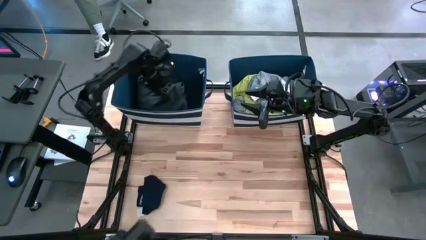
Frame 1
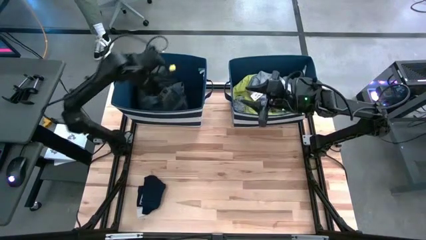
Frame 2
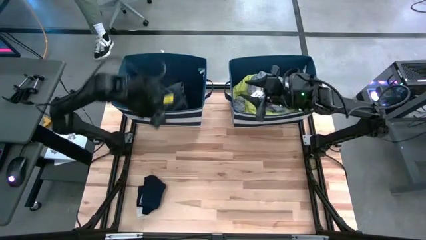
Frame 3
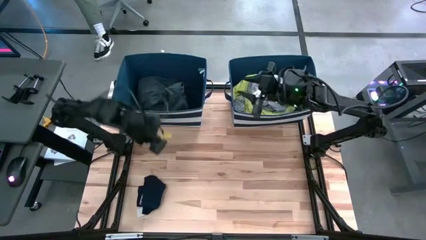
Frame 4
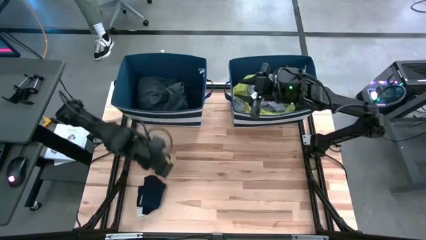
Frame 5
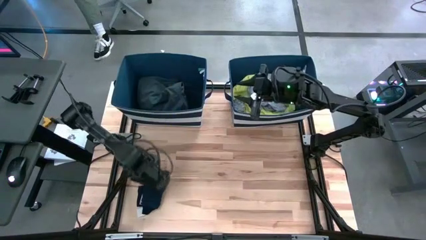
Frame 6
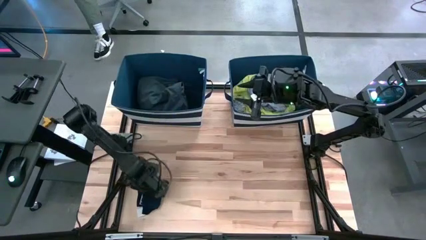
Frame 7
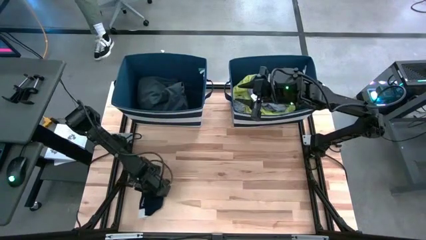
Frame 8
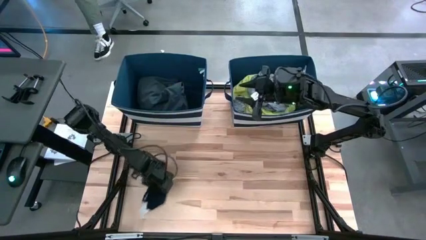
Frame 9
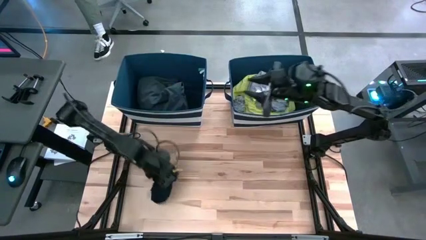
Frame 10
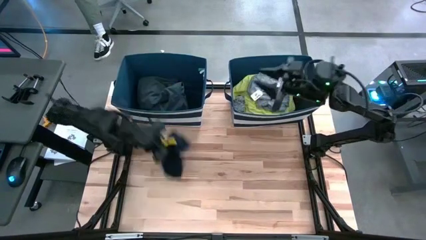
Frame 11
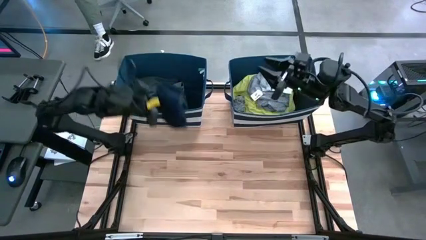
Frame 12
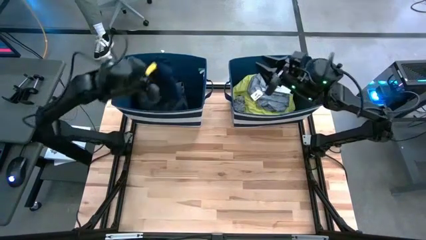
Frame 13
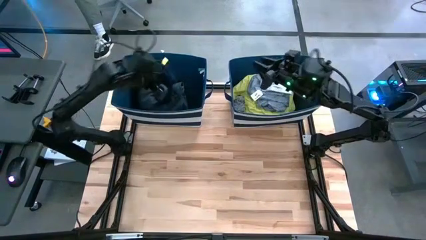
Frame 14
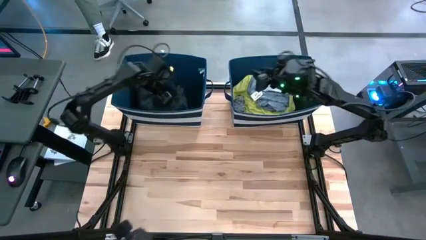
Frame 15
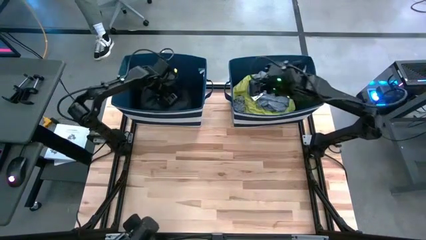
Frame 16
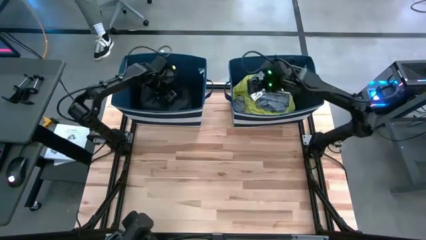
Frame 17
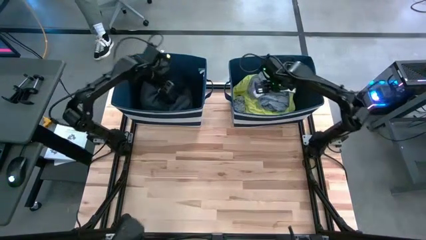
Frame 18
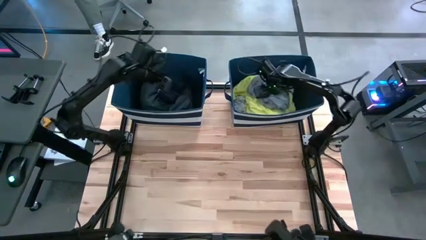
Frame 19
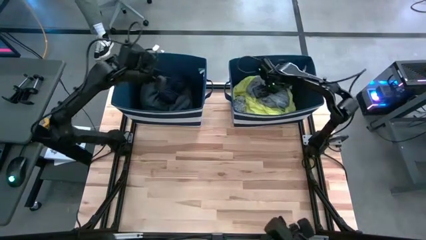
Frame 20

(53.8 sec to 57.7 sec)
Task: Sort clothes
Put the dark blue shirt into the left blue laundry bin

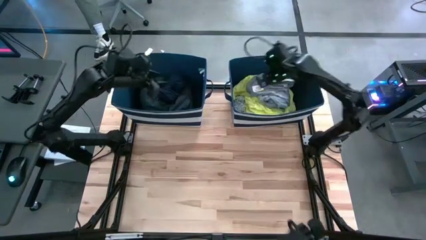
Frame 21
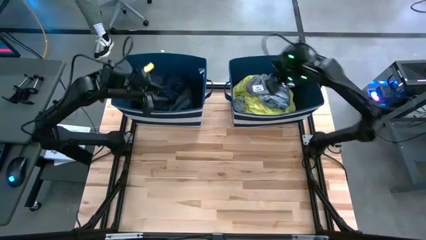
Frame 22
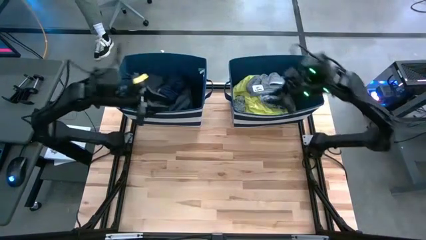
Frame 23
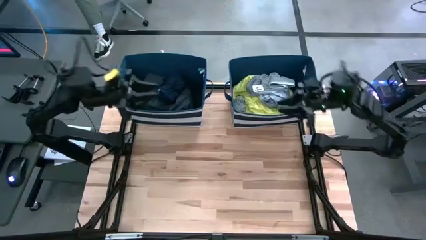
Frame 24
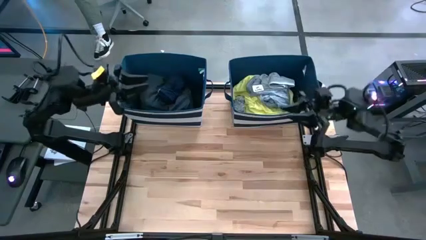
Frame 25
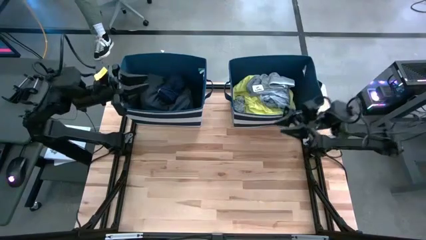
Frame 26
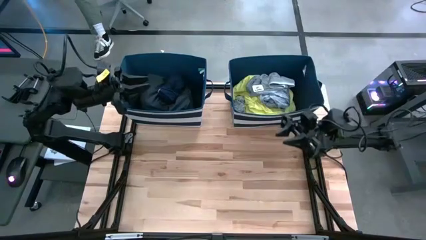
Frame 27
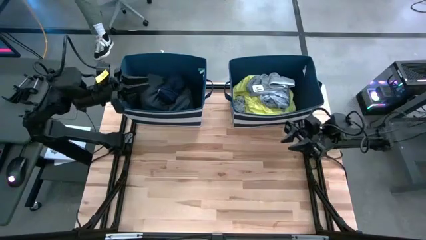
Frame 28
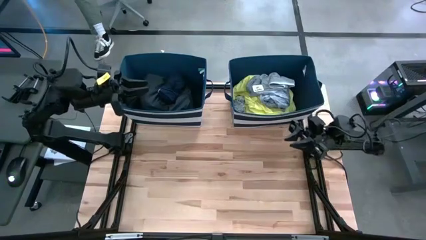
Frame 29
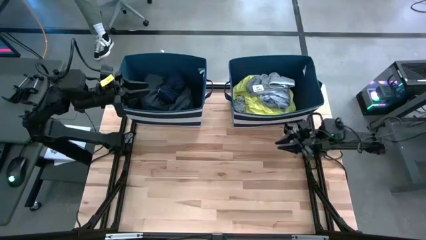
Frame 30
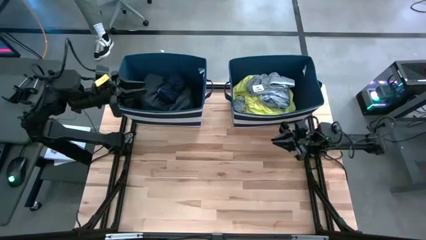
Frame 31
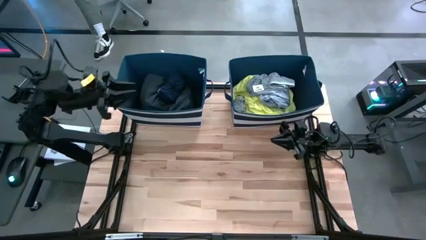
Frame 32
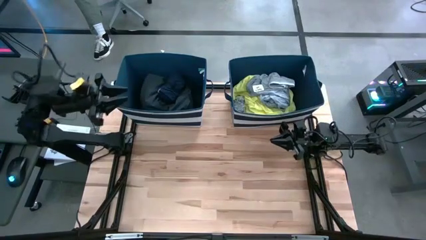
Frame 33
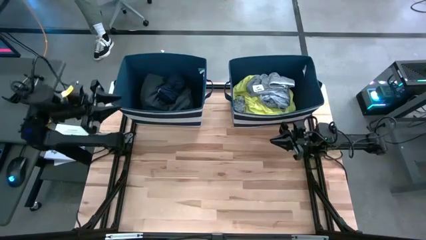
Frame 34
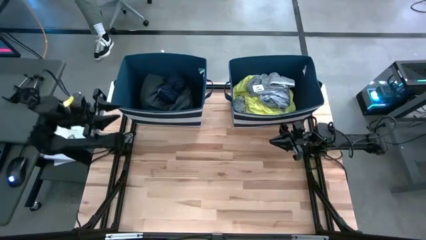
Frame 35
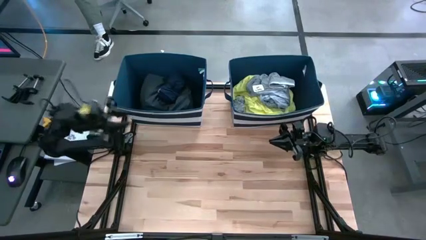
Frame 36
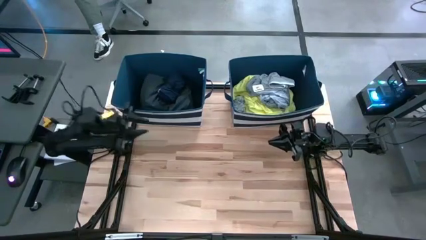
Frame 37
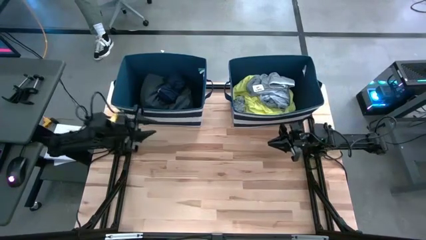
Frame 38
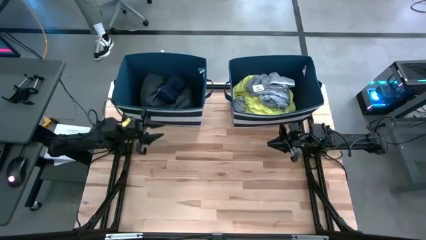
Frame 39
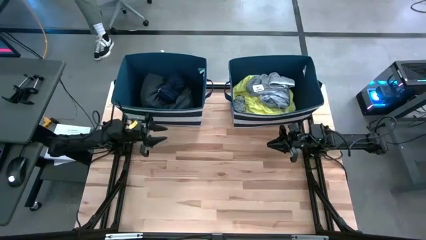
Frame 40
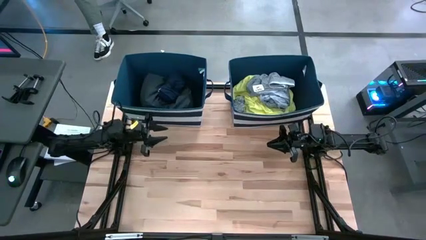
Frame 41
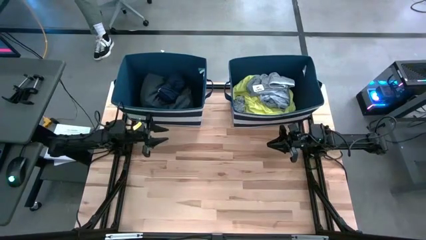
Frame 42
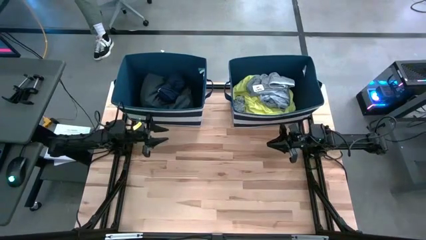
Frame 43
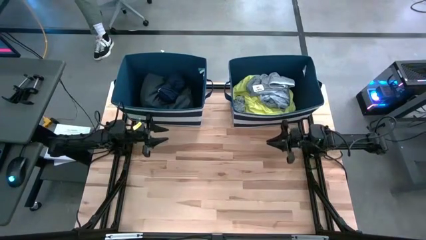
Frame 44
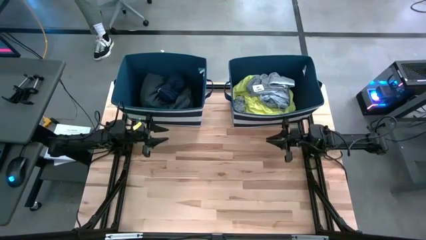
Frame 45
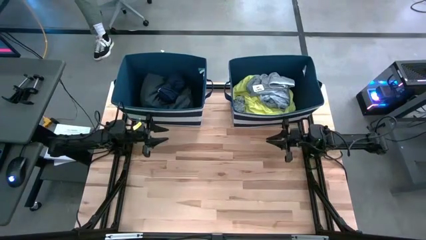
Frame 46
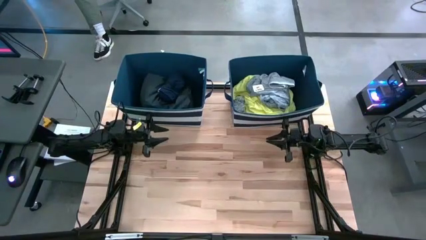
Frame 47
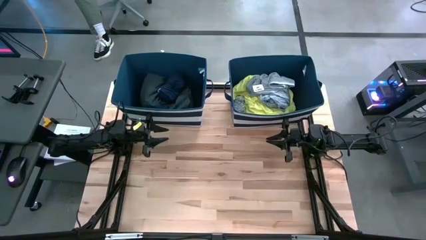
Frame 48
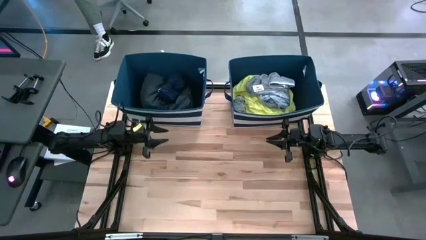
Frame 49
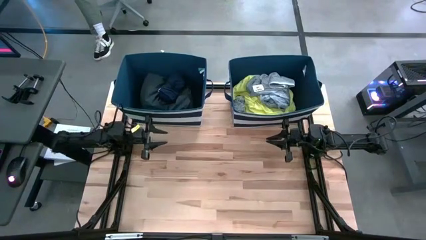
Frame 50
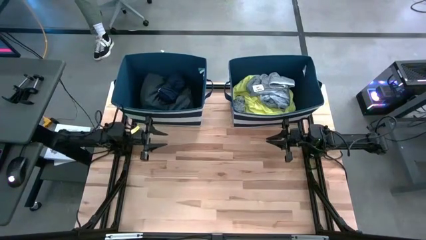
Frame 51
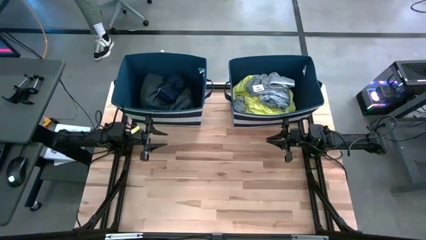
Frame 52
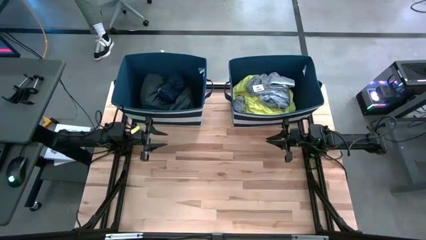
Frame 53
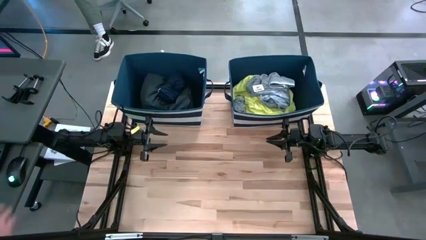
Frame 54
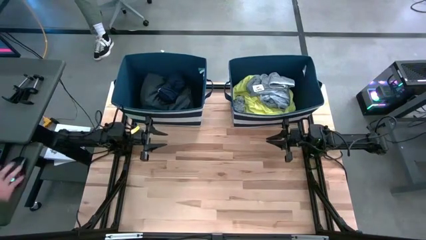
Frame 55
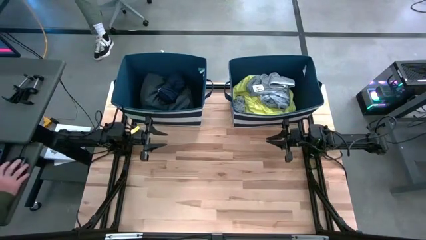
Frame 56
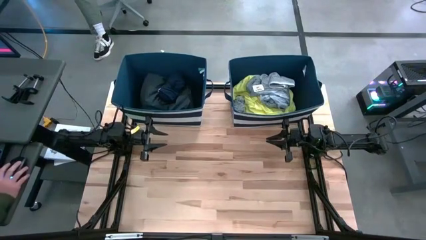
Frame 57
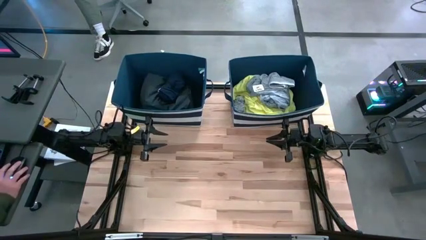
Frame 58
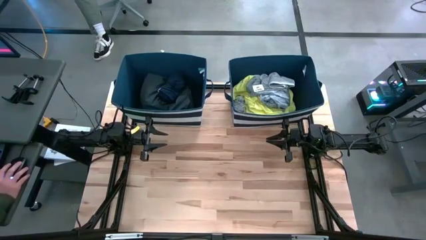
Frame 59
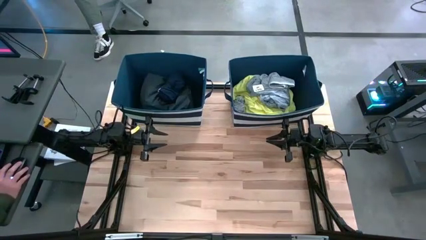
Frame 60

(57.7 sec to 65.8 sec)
Return to Home Position

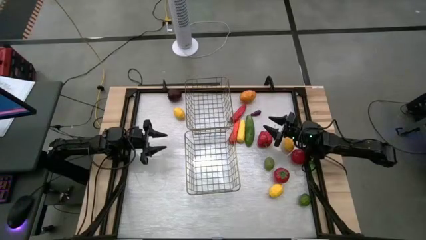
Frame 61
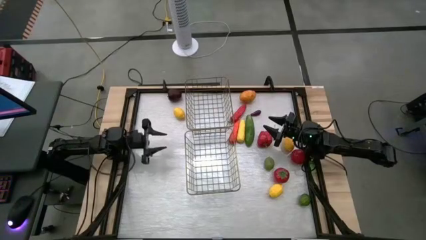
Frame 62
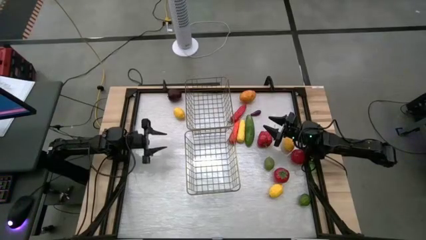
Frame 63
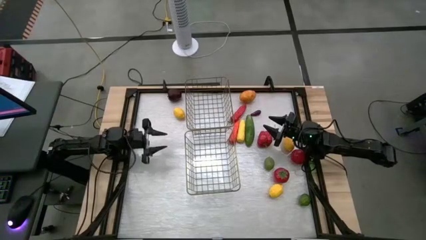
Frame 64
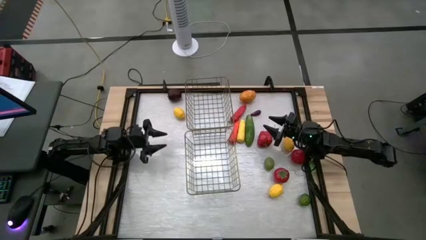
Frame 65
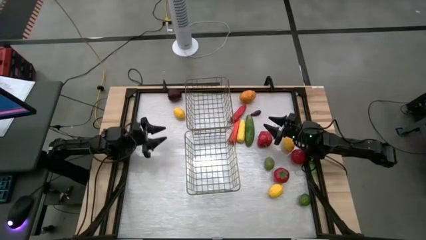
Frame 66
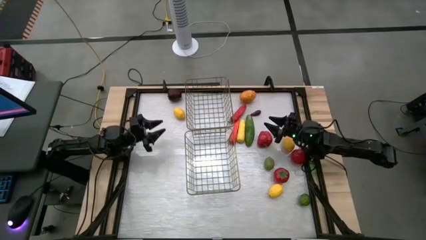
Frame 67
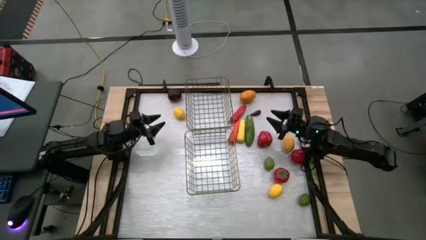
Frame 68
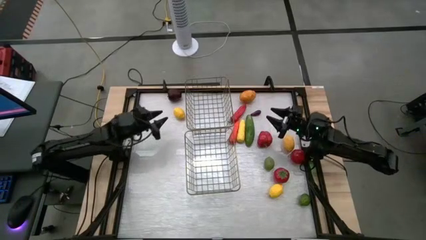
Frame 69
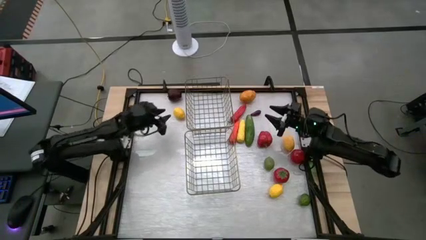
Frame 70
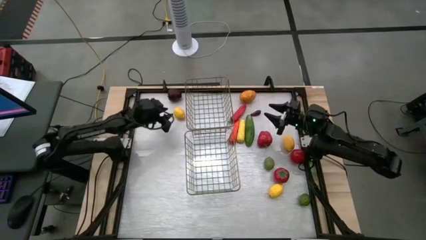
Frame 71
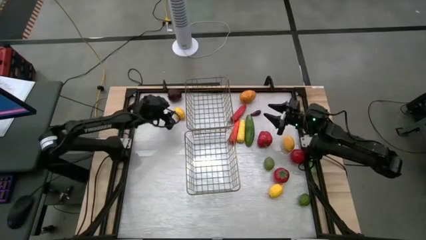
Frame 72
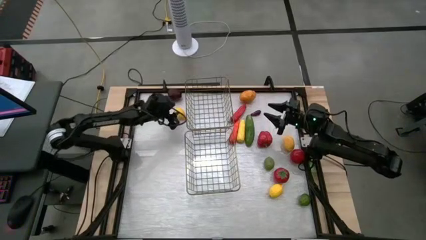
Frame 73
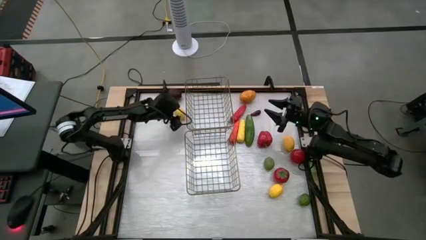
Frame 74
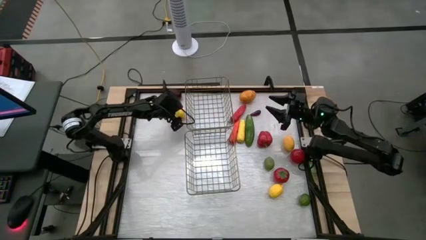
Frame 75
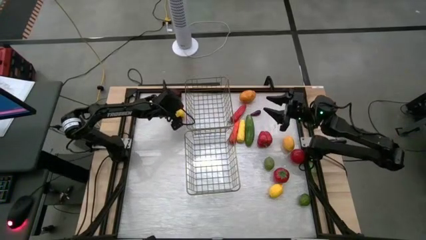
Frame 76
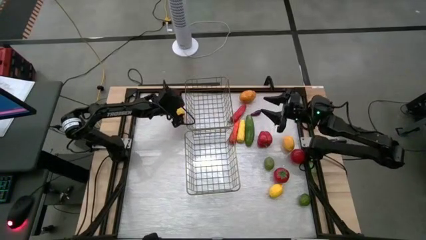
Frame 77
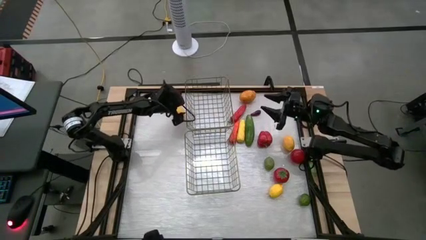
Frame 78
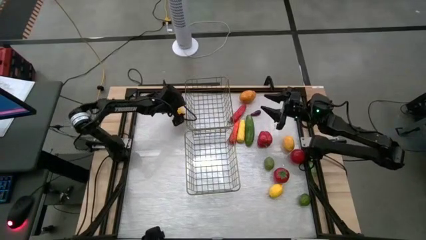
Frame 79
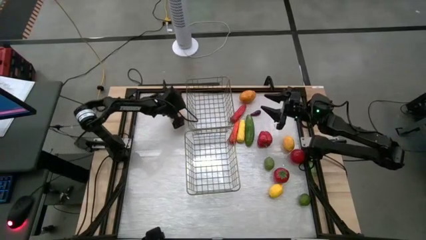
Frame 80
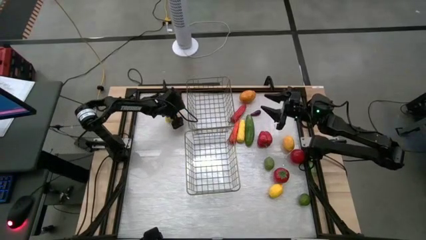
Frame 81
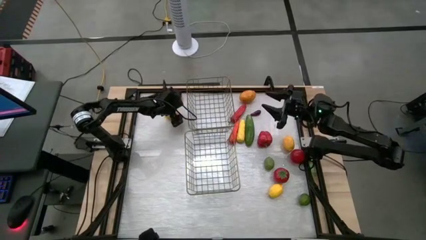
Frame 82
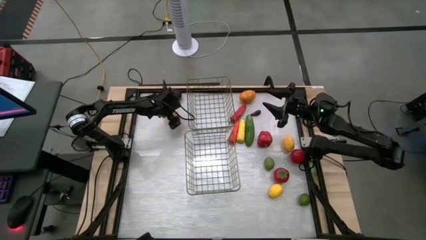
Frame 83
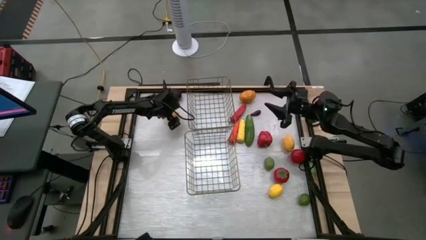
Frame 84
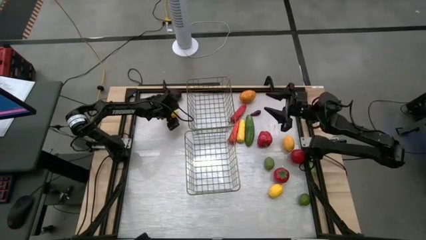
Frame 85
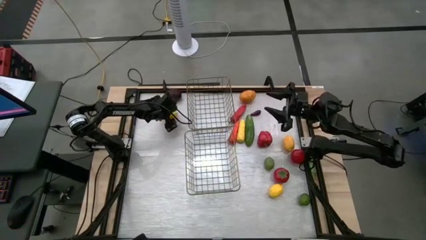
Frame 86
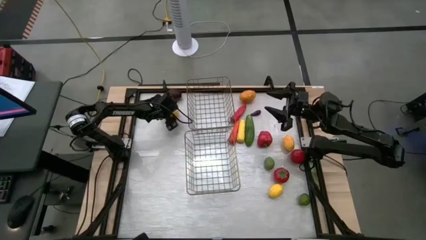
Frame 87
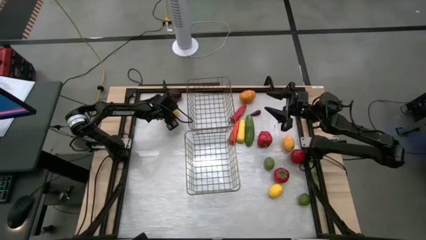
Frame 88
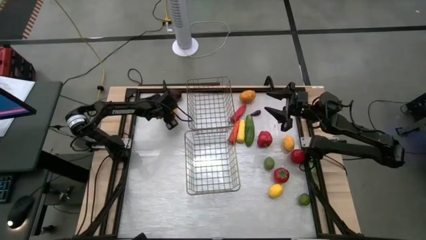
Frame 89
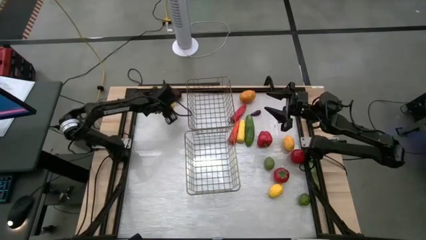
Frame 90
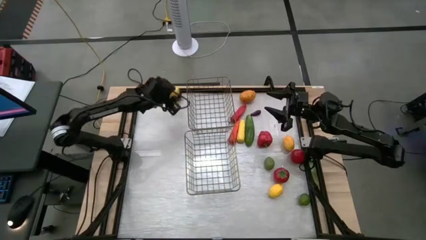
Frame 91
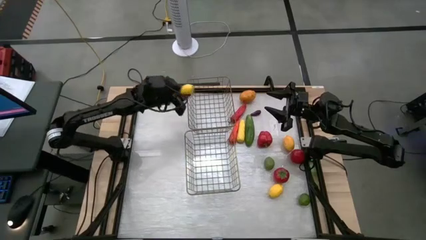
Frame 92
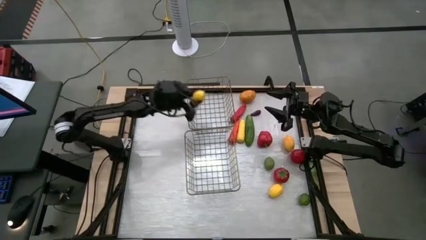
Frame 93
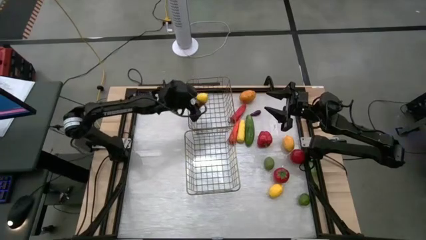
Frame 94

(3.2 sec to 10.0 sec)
Task: Sort produce into baskets
Put the top left lemon into the top wire basket
